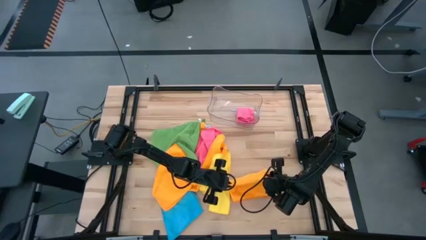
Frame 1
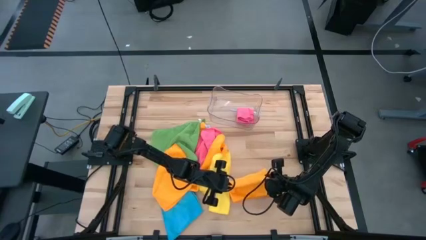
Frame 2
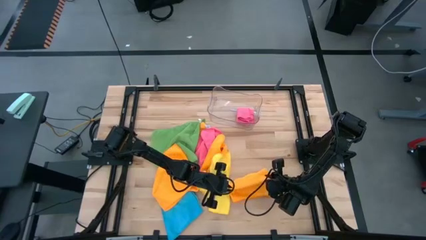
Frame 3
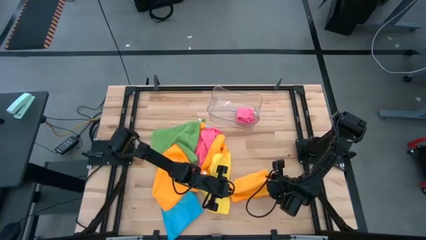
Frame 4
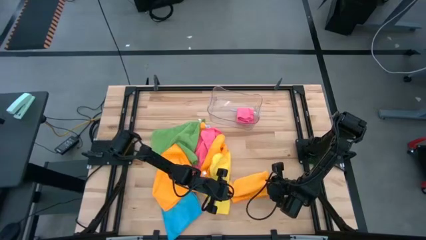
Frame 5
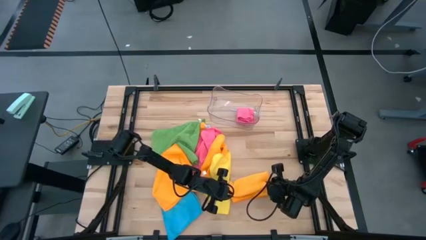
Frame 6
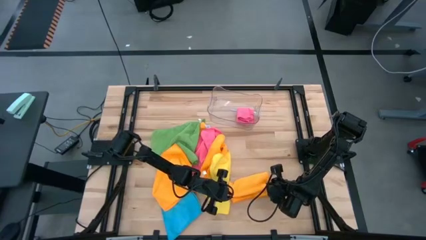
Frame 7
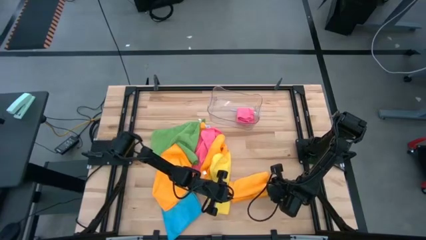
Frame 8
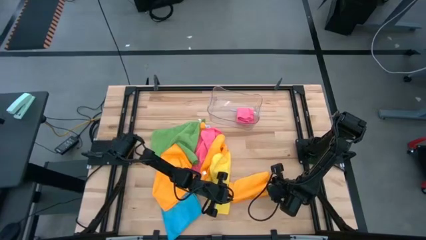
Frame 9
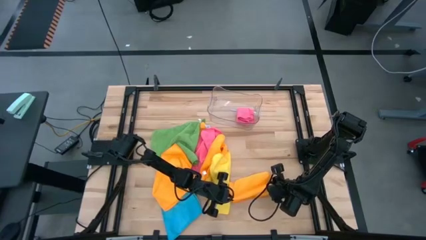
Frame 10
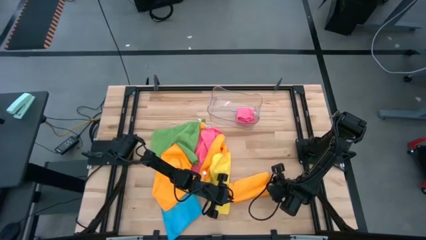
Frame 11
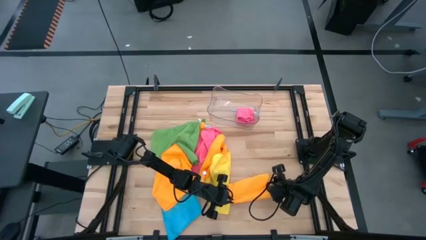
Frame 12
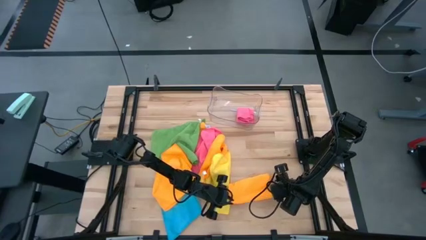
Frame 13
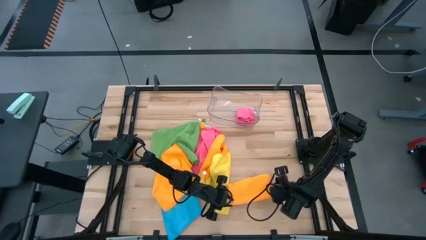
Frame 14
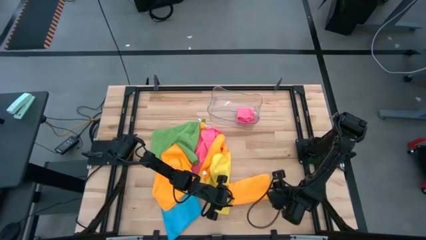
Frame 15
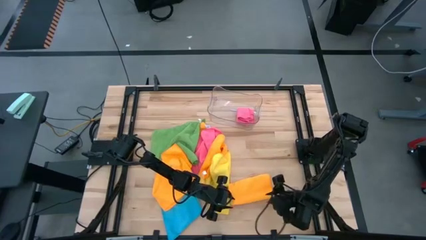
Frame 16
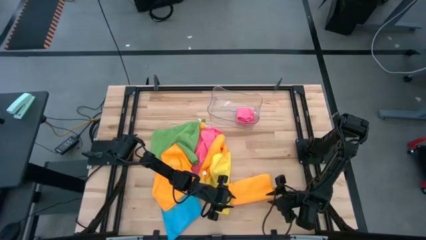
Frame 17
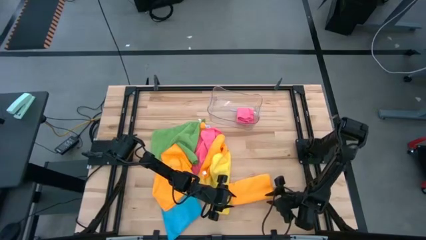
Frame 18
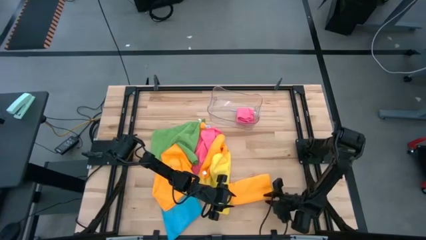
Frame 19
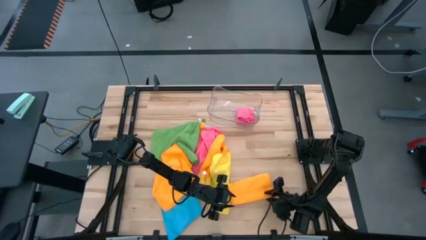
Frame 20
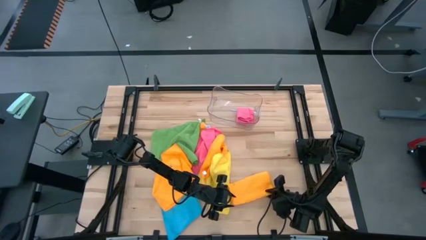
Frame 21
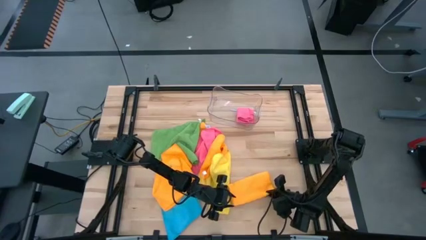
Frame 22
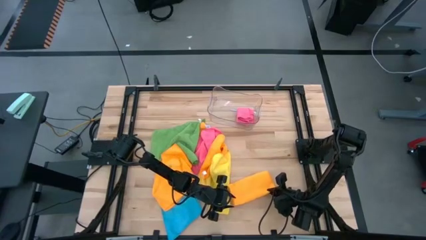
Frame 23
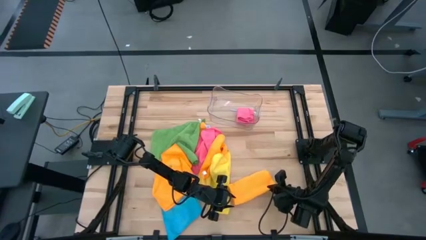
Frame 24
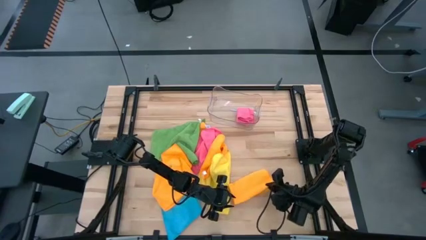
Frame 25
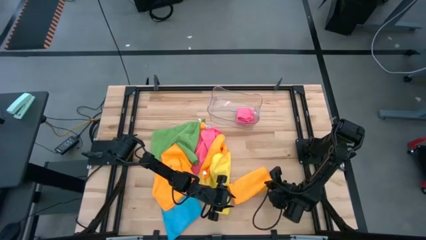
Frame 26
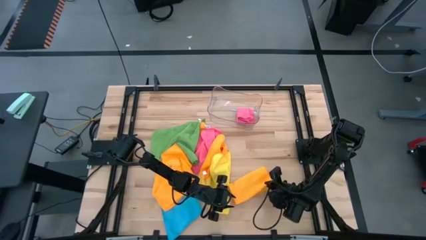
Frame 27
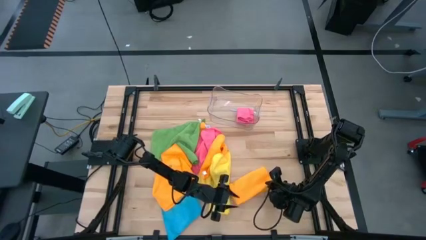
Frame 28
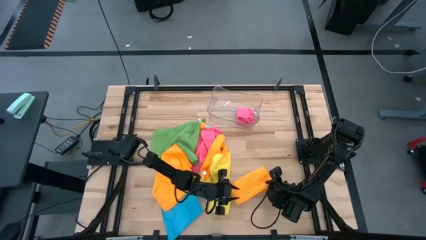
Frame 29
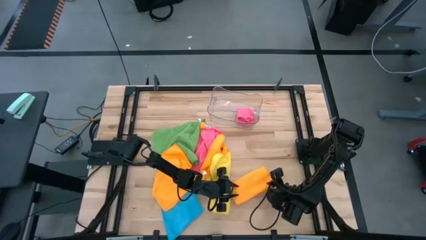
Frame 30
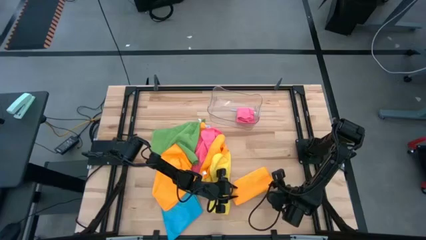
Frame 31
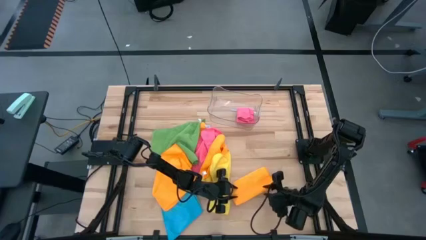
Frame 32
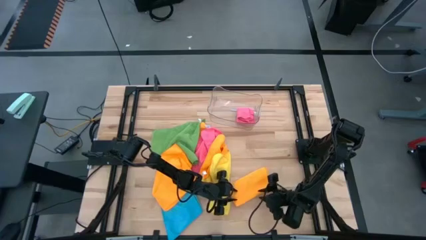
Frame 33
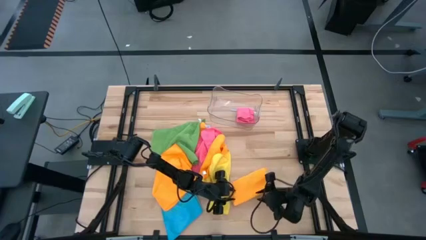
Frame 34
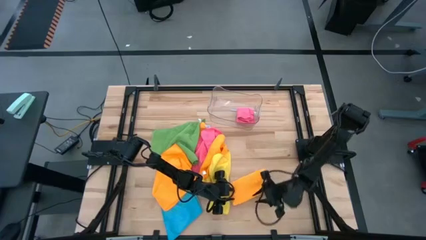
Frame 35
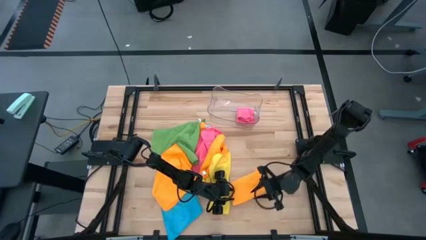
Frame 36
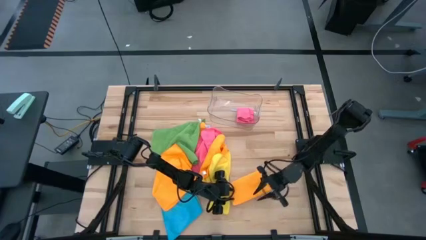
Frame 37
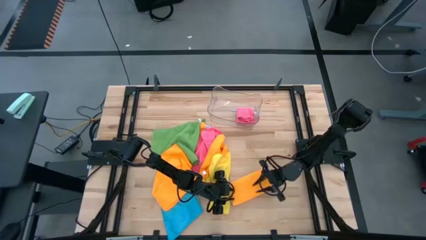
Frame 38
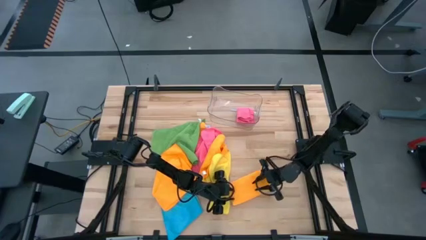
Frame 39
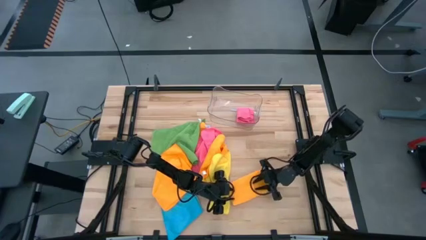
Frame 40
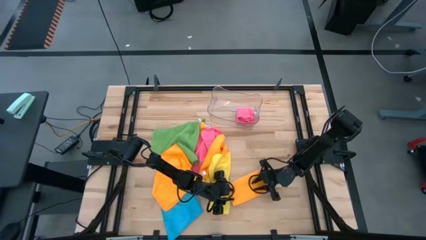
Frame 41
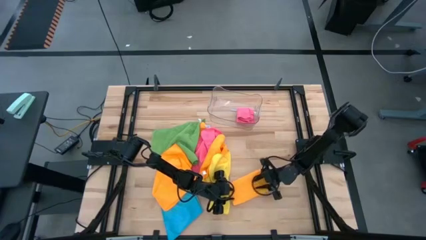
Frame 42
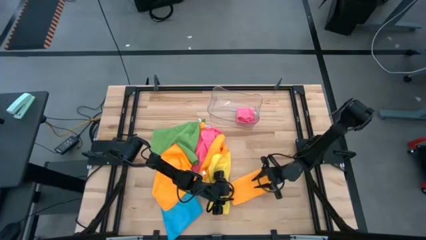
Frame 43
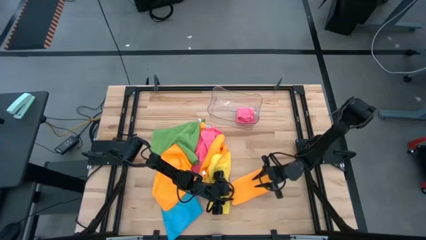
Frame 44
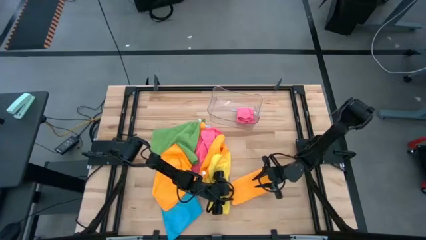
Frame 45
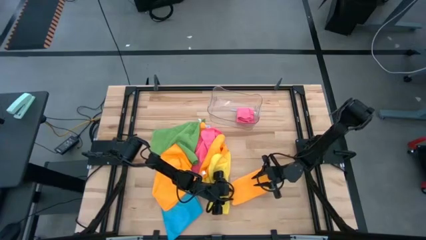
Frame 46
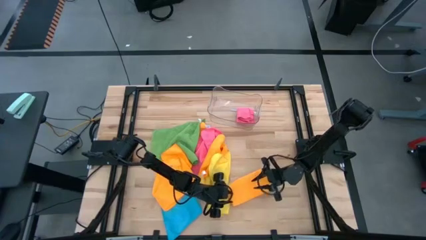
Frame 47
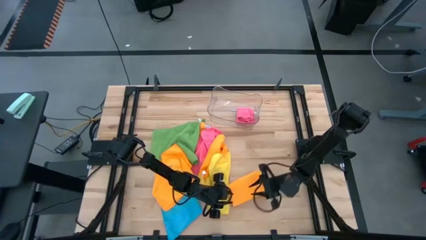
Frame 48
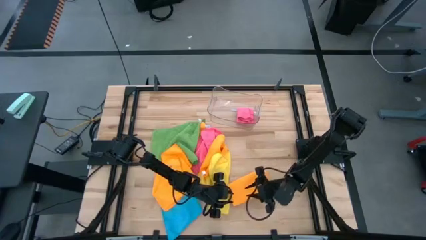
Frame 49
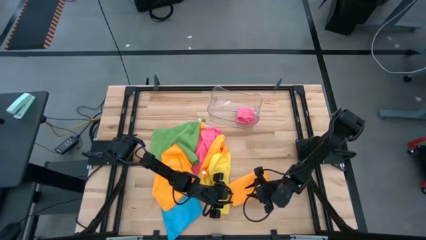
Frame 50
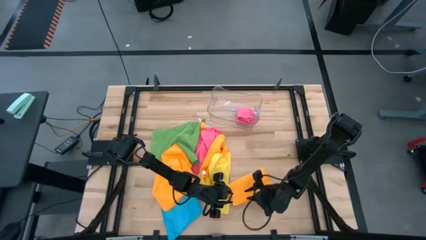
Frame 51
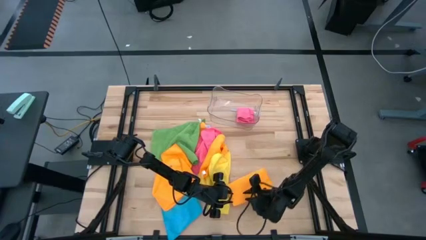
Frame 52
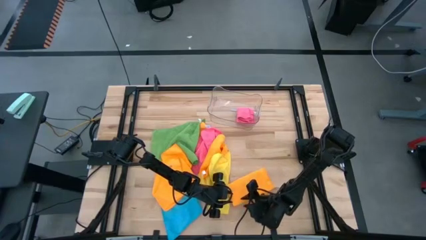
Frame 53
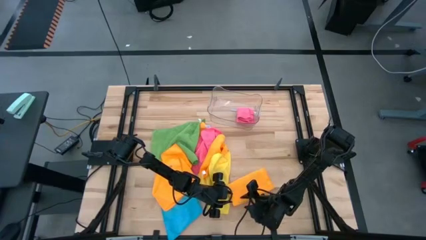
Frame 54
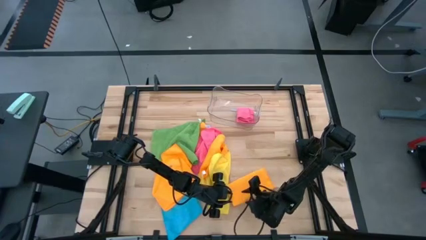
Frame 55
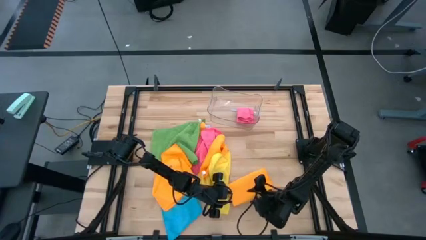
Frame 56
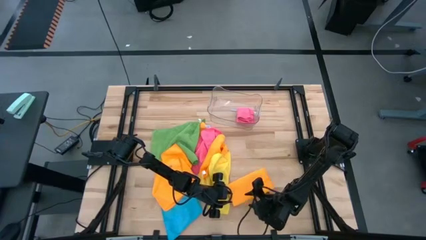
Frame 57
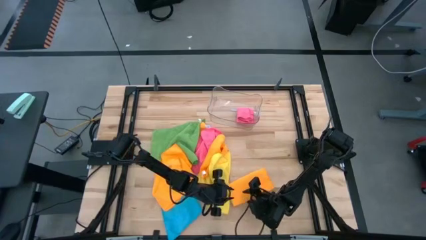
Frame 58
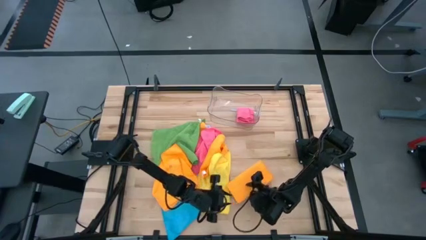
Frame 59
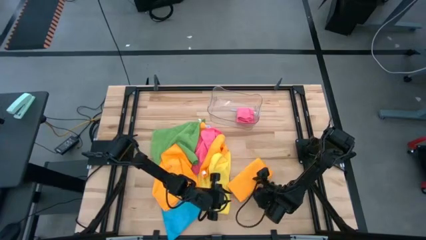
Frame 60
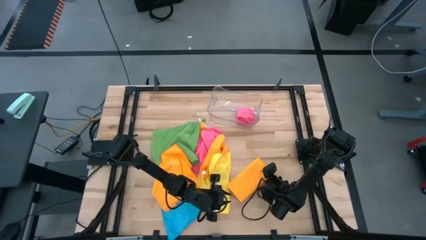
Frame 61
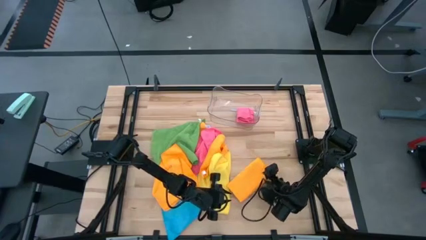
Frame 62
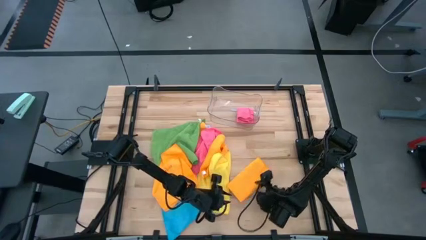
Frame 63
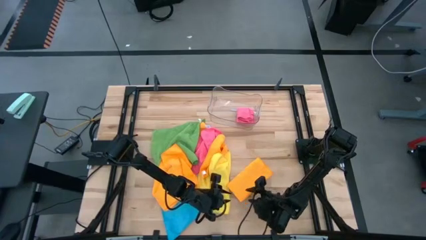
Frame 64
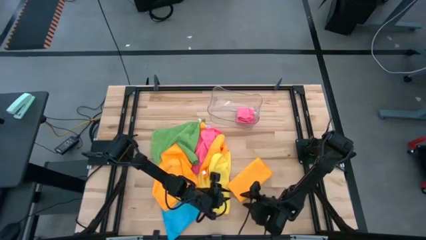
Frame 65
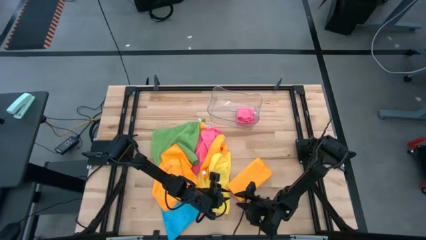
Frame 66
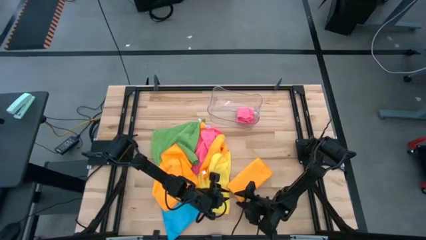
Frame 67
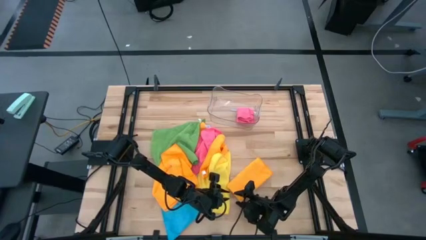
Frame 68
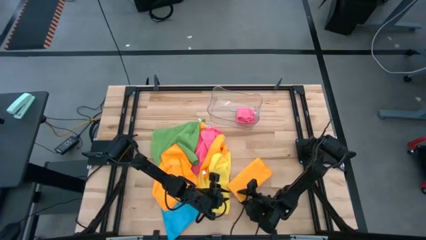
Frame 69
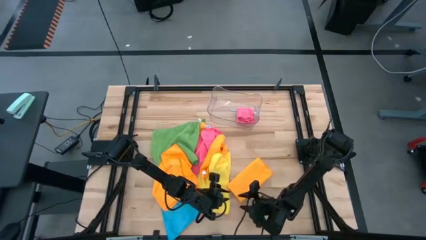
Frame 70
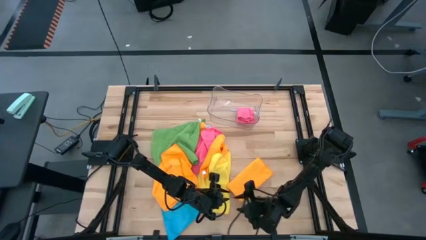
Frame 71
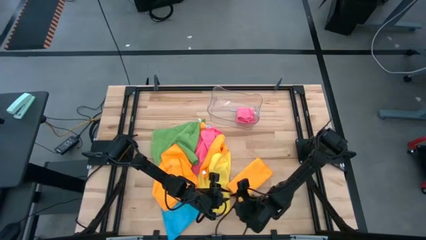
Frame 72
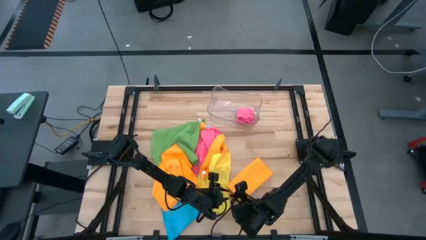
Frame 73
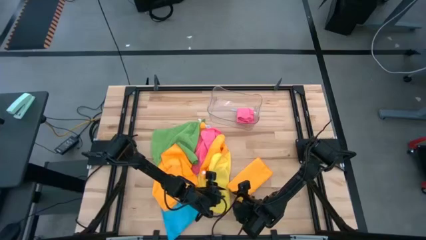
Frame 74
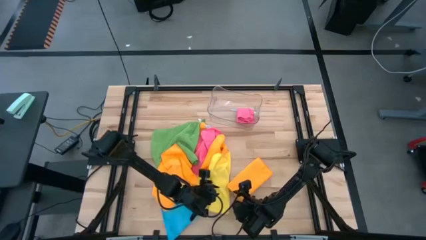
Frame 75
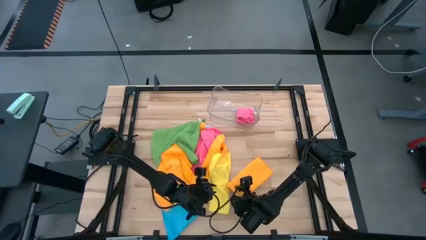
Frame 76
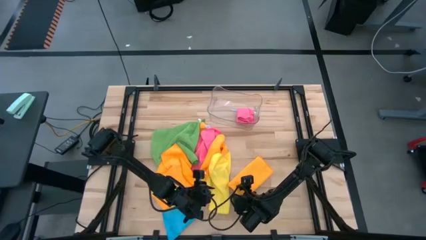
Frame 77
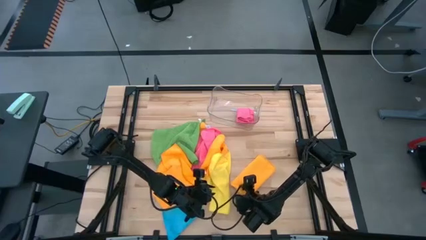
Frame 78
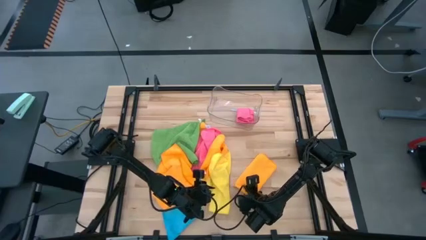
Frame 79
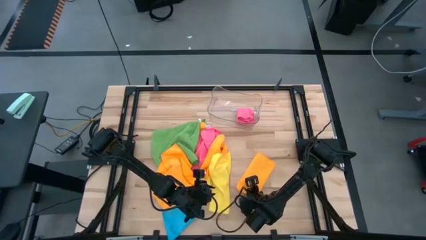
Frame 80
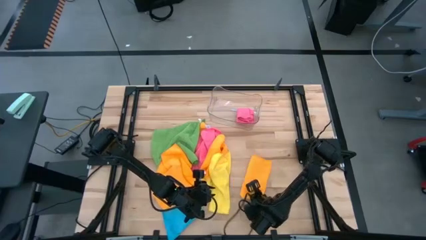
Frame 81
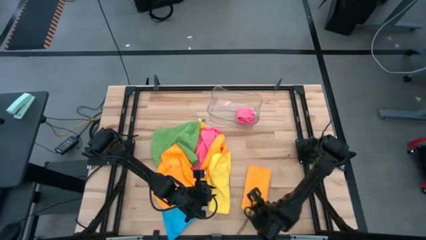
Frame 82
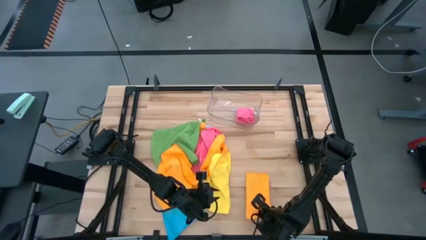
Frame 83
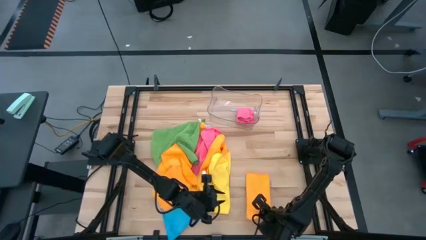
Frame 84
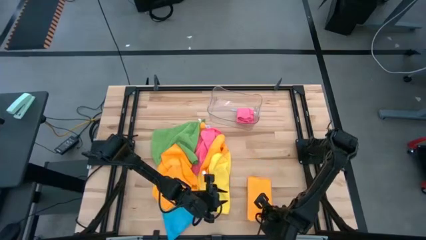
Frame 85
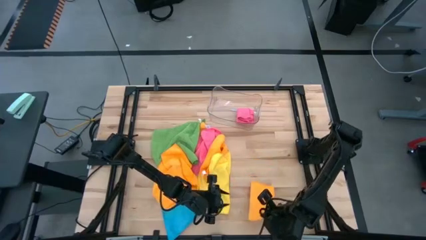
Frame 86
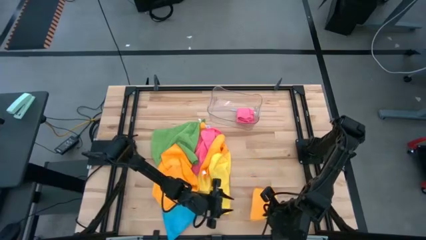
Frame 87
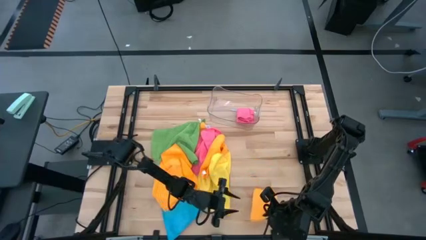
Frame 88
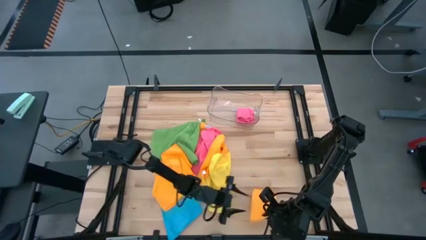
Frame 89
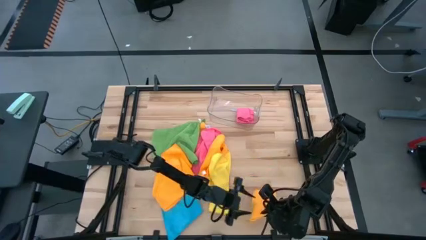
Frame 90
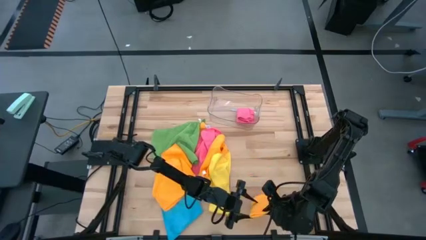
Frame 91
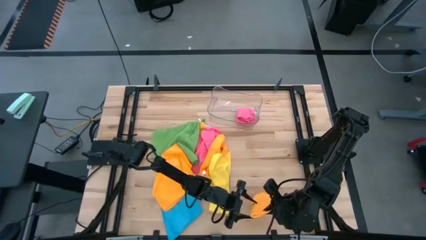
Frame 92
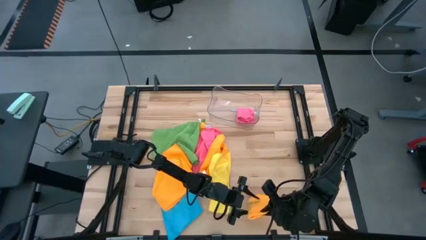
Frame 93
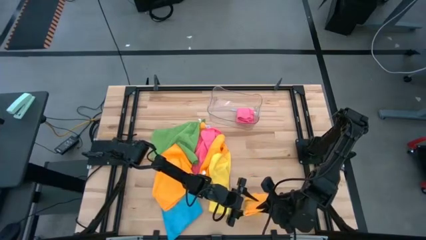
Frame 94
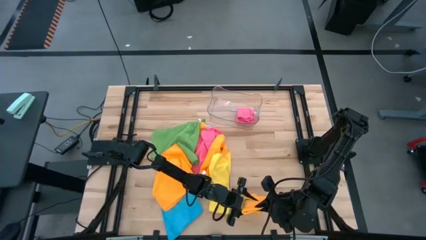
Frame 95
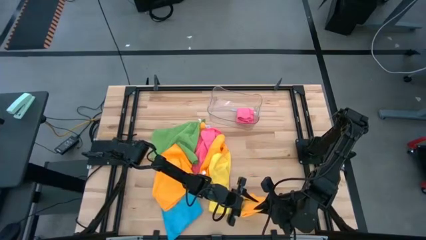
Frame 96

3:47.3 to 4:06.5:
Task: Fold microfiber towels
Fold the right orange microfiber cloth
